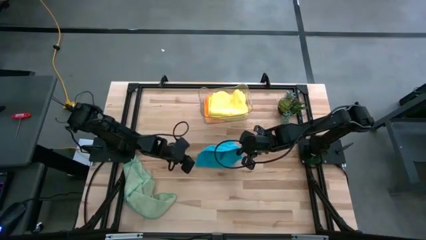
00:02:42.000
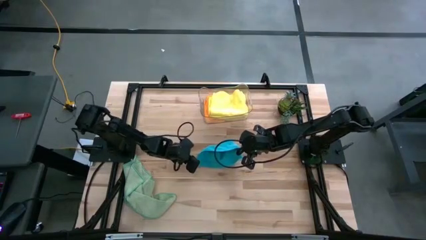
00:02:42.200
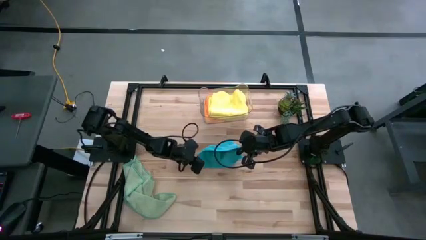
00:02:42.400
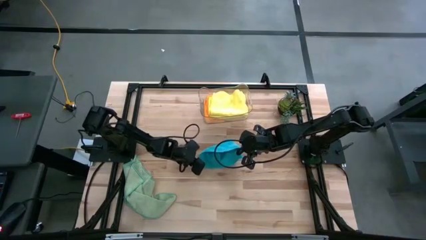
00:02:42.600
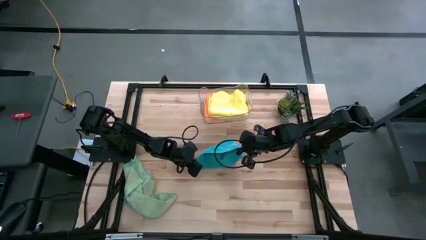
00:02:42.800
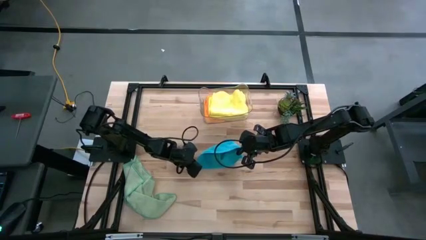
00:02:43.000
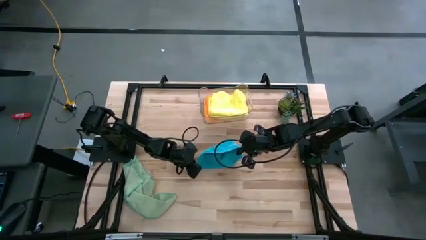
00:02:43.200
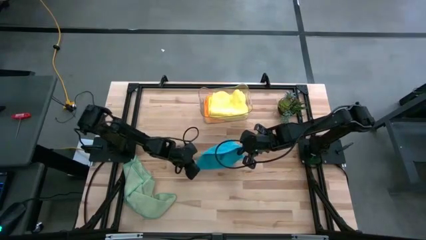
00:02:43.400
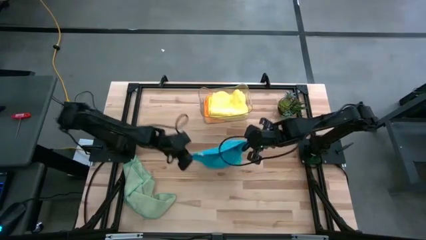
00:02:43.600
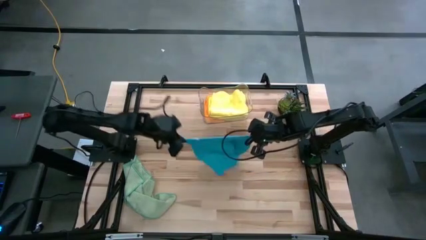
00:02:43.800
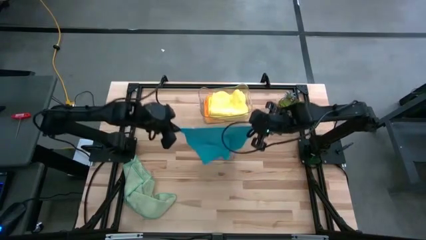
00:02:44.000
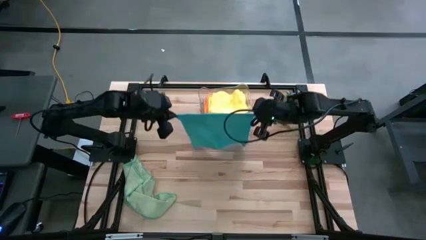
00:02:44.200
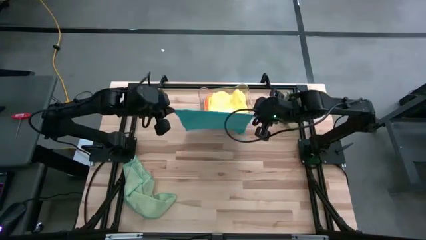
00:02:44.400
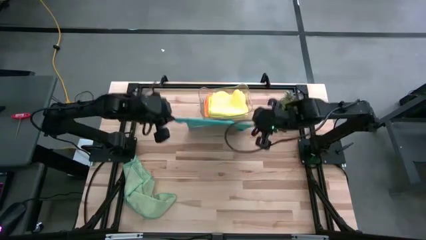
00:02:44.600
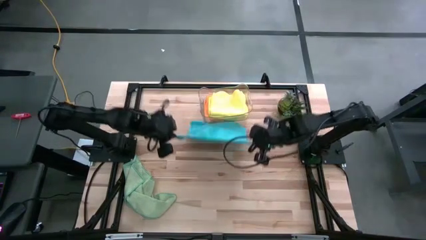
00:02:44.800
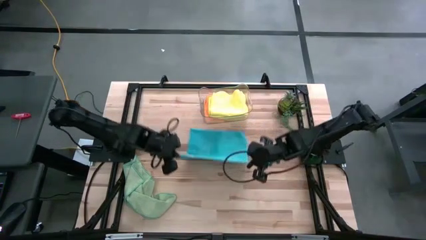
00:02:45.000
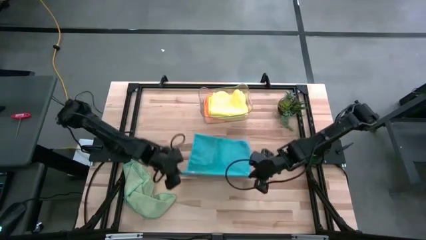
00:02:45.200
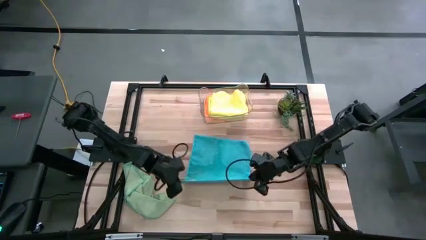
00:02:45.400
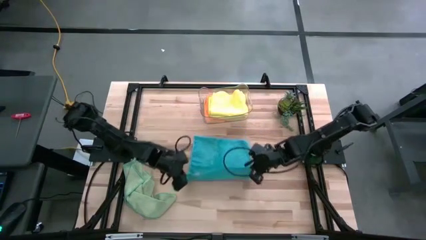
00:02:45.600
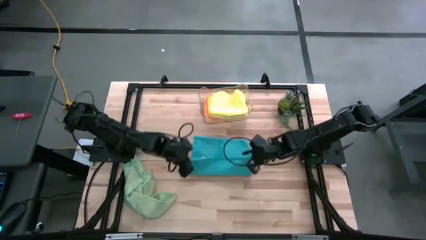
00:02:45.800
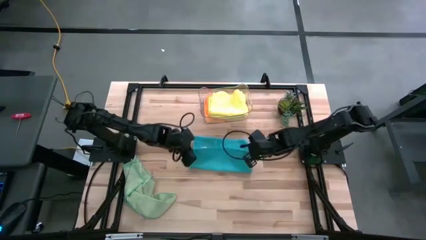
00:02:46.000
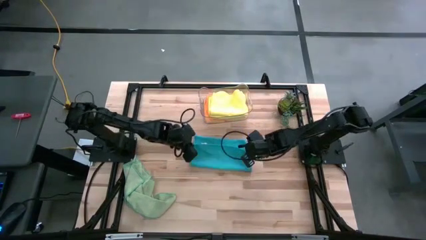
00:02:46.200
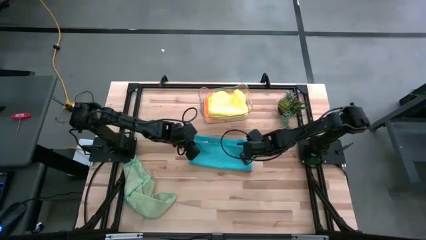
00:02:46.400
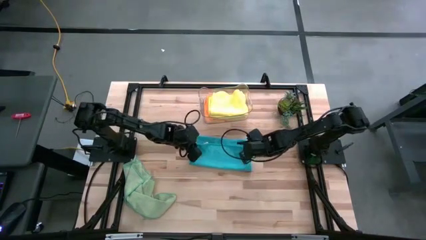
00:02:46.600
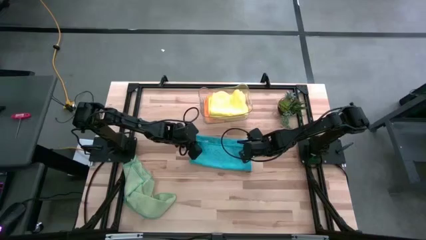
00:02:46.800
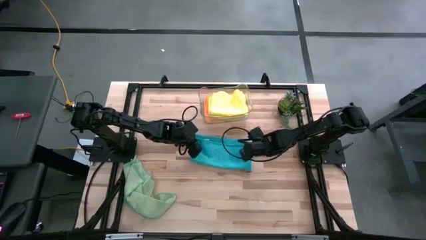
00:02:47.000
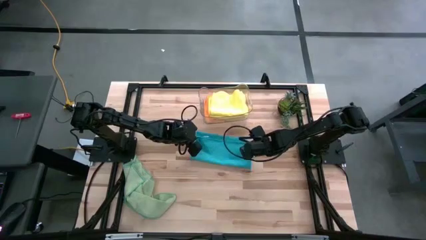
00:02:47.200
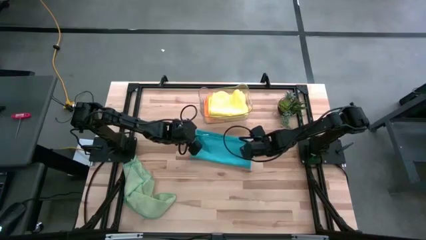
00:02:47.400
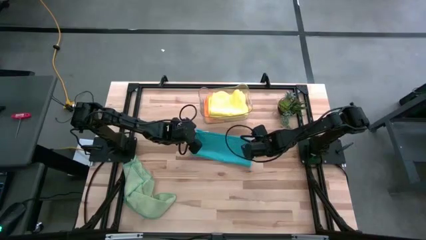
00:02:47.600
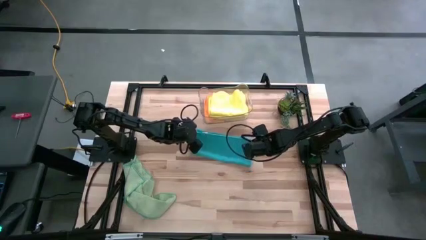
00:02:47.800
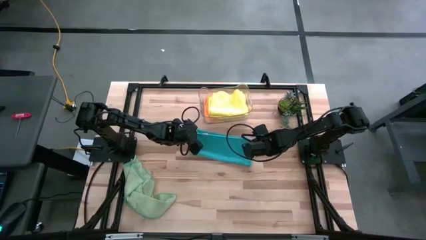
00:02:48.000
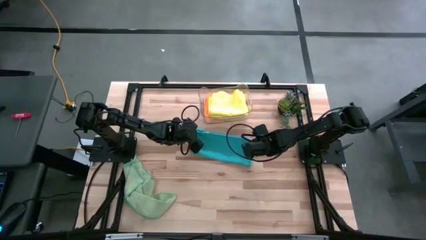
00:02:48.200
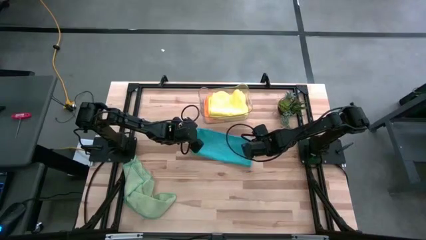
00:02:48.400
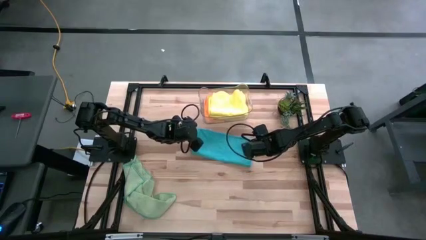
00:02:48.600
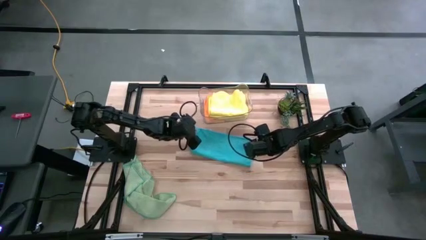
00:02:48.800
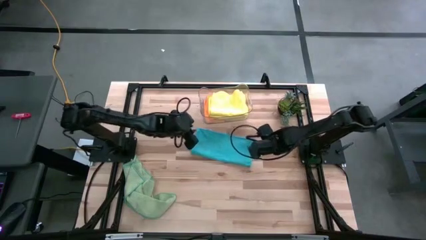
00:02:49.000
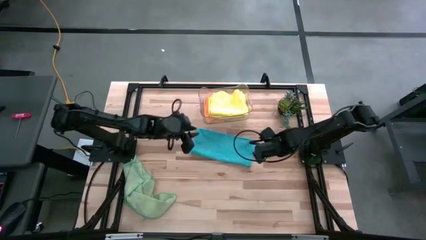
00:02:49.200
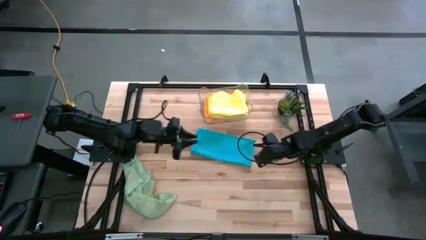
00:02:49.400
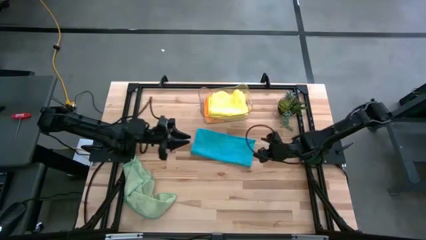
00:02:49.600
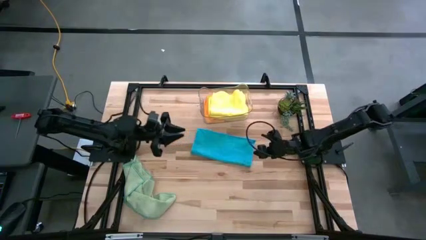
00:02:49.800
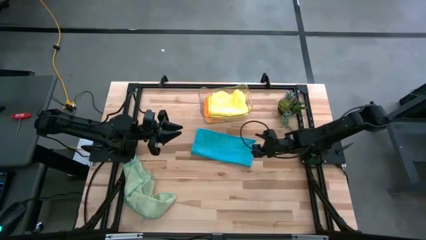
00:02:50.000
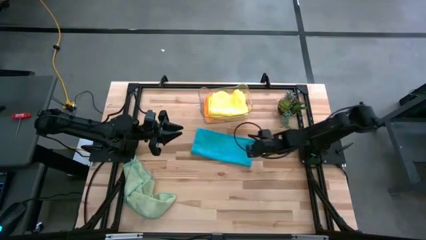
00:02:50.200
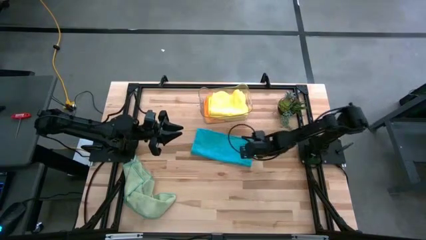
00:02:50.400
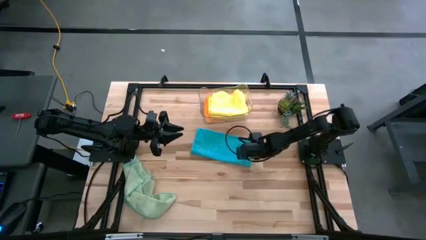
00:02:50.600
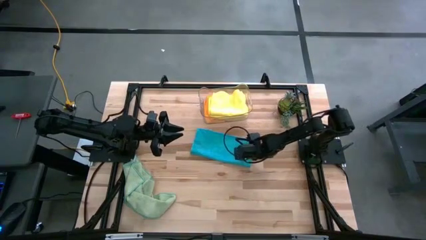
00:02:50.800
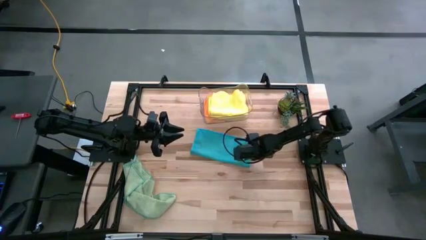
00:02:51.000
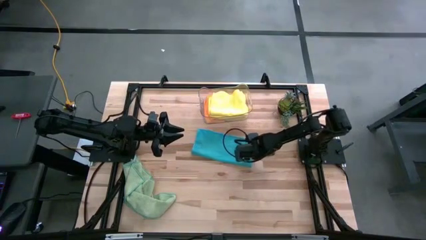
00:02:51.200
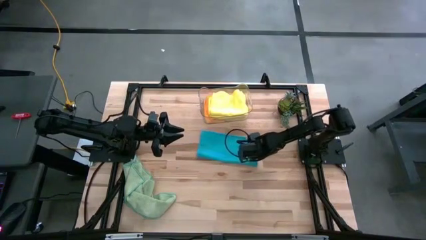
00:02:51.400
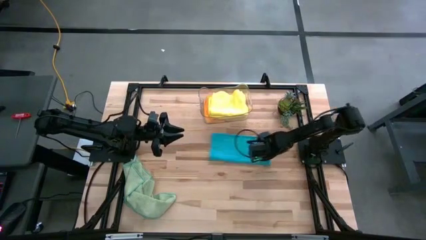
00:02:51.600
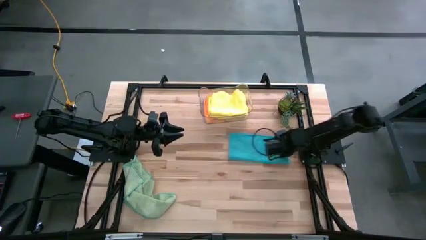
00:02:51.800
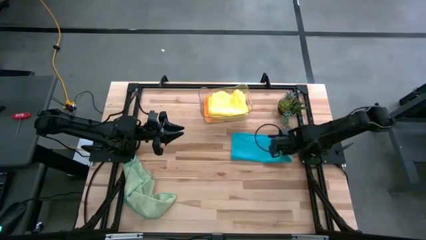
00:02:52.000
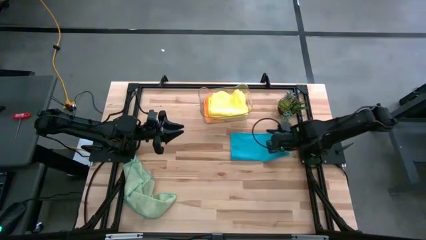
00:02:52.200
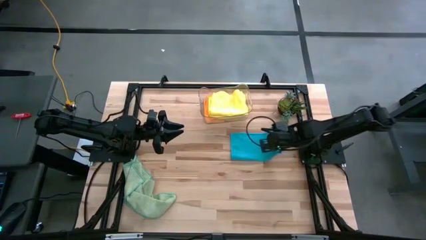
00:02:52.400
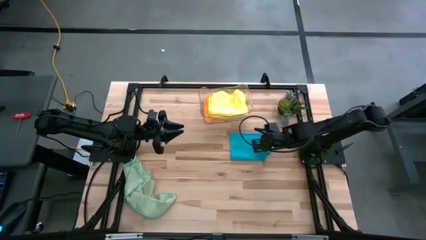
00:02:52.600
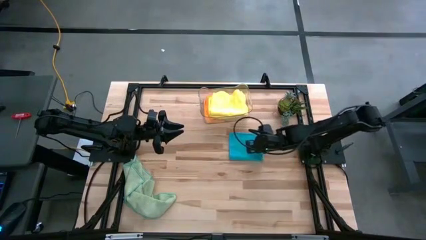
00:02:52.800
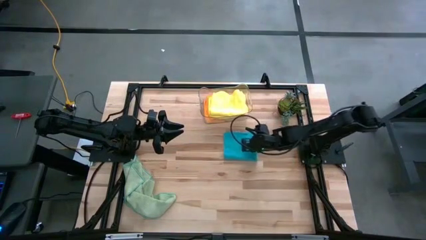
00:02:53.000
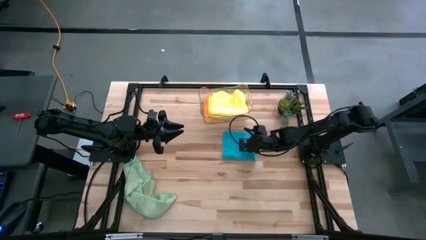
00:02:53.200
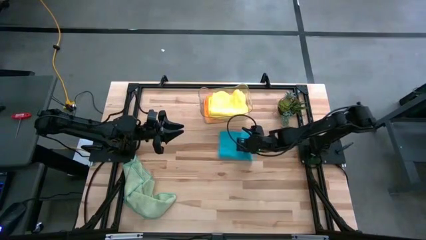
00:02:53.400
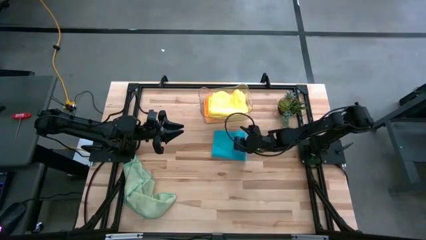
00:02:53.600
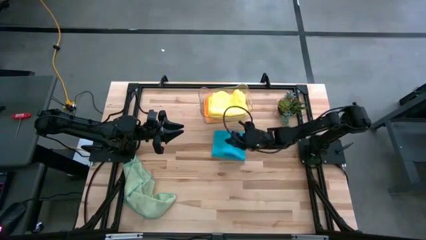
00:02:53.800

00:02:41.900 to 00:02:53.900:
Task: Fold microfiber towels
Fold the blue microfiber towel

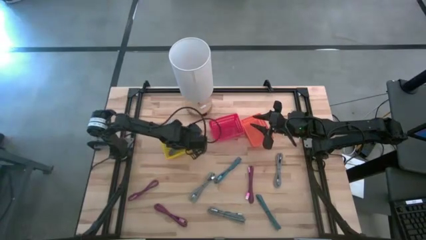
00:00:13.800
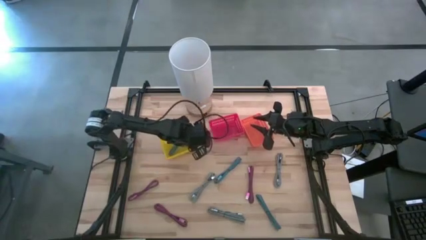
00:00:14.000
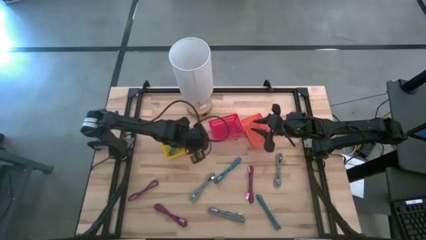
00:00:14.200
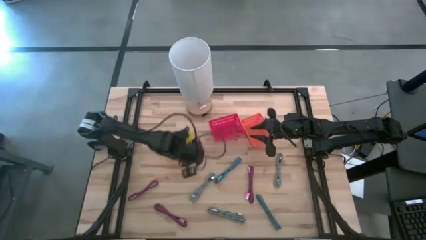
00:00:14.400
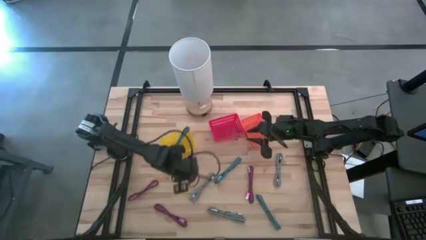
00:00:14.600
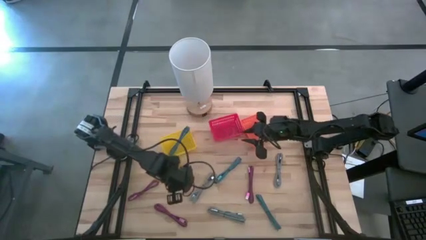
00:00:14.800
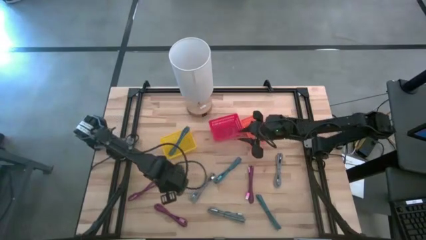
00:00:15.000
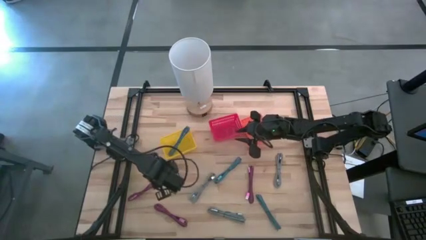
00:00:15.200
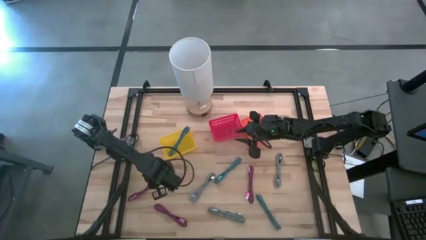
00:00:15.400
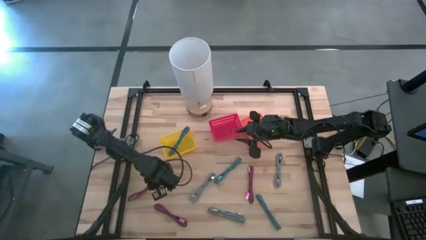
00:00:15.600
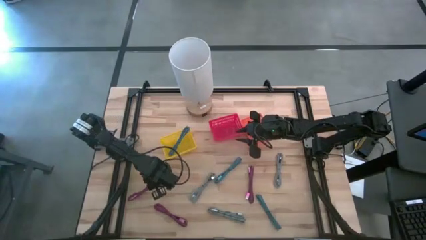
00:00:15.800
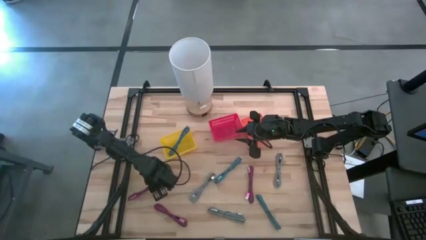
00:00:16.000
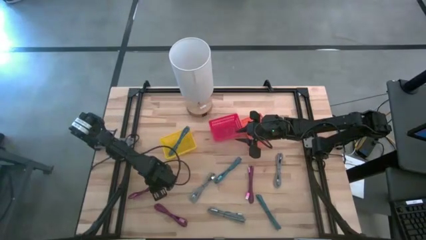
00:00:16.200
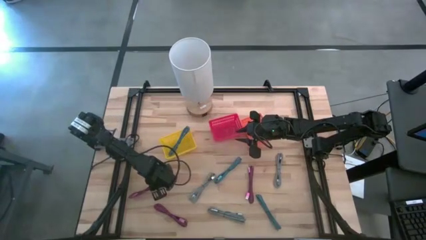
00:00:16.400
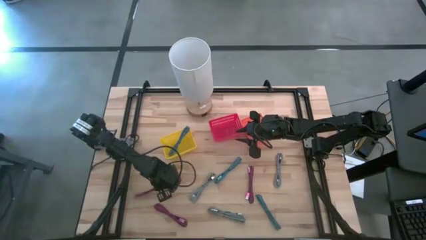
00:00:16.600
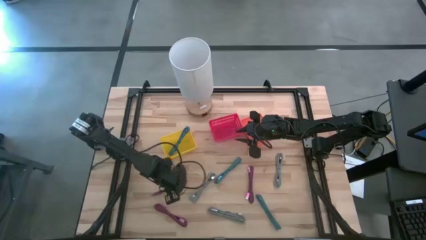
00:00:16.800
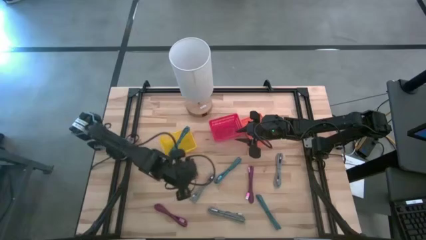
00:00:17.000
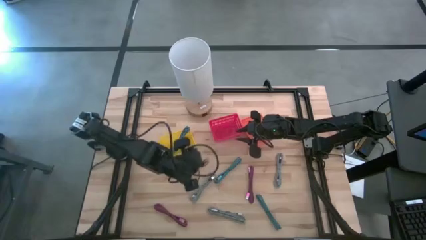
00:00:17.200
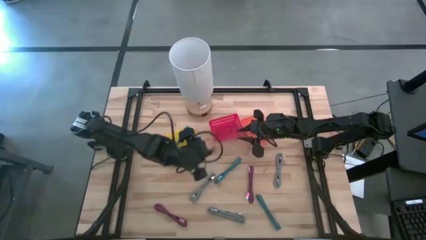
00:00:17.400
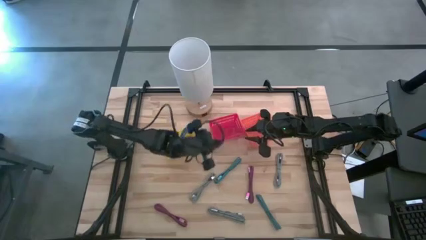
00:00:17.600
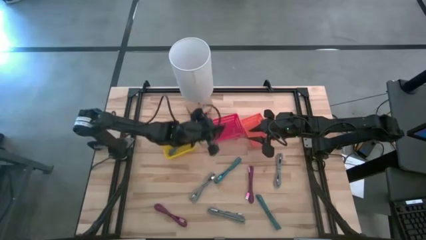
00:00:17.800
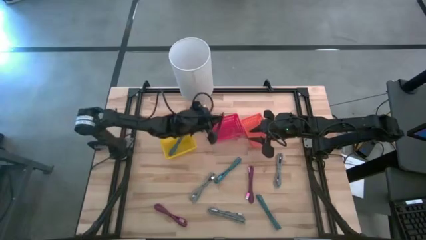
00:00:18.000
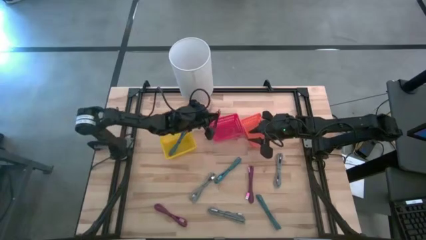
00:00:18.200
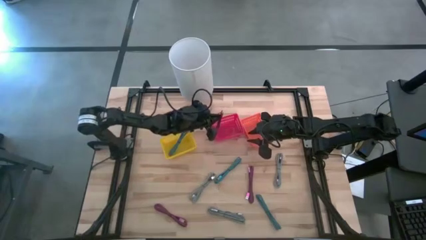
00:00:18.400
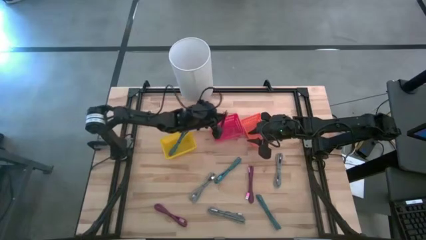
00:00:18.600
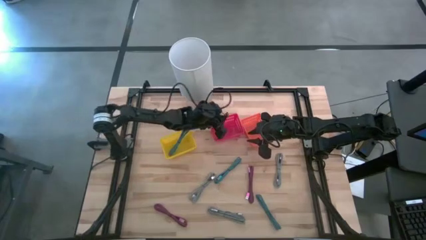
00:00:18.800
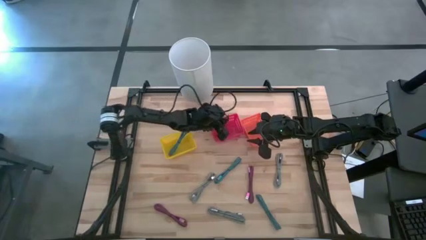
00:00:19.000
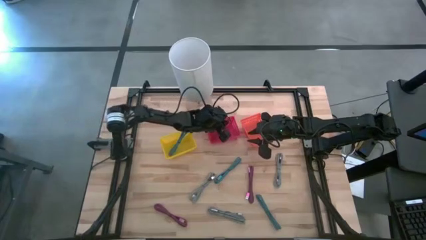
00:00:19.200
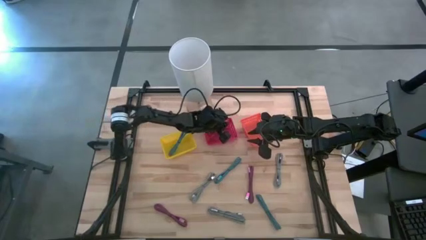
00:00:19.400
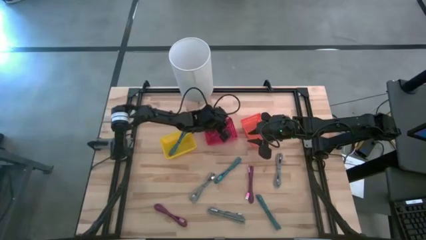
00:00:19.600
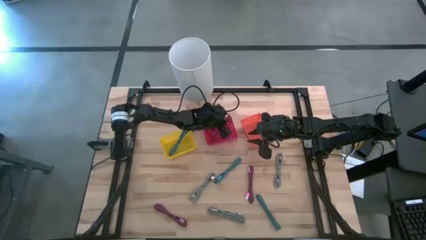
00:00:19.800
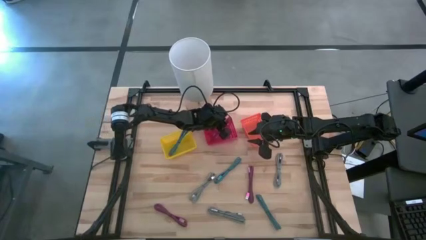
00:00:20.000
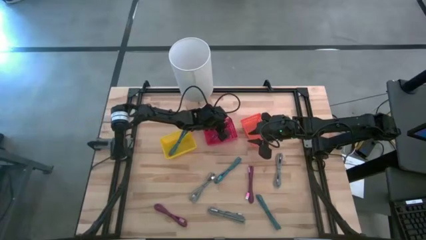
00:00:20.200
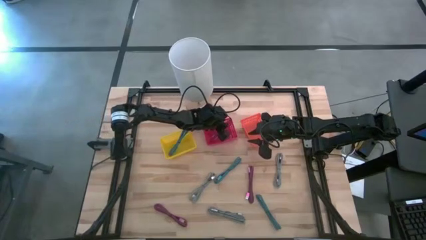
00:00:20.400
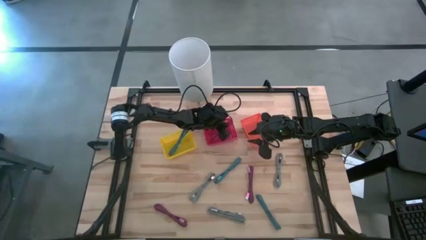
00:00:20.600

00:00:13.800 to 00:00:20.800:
Task: Pick & Place USB Port
Put the top left pink charger cable into the red bin
